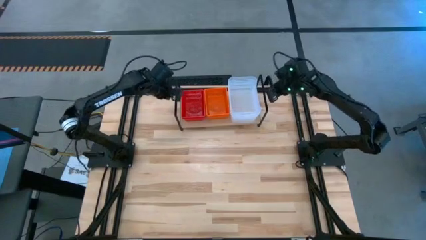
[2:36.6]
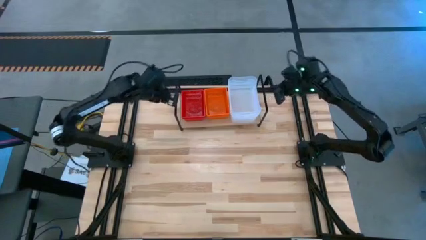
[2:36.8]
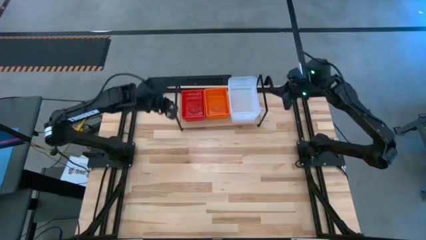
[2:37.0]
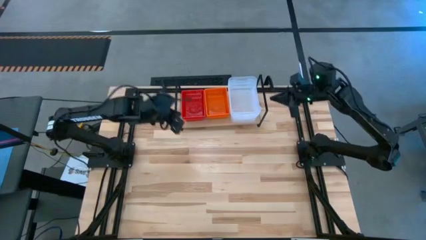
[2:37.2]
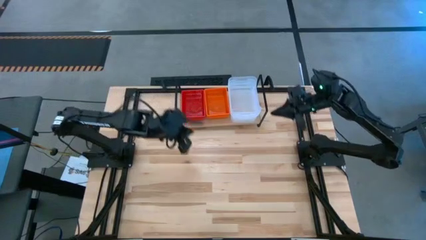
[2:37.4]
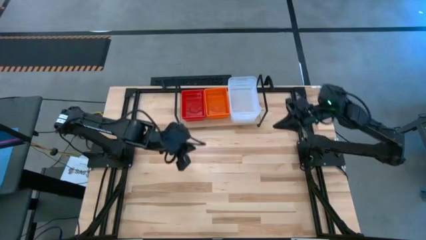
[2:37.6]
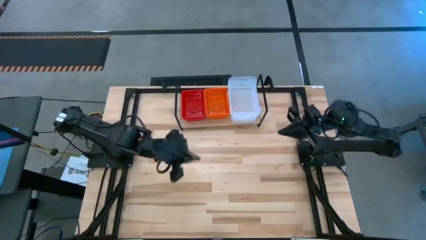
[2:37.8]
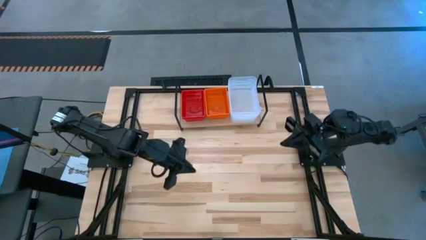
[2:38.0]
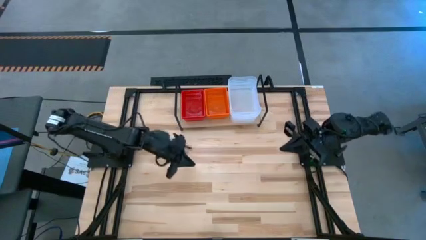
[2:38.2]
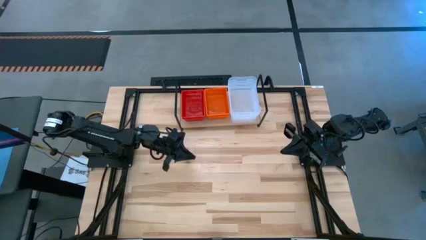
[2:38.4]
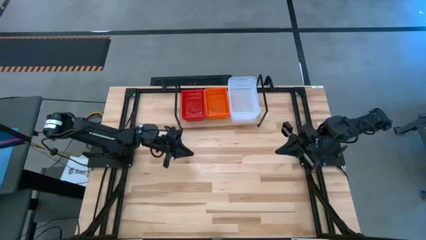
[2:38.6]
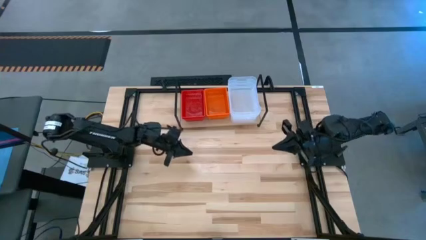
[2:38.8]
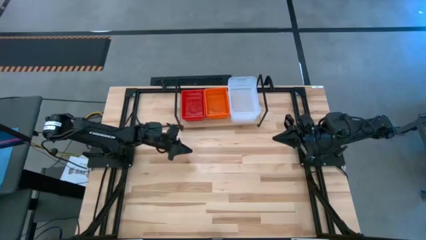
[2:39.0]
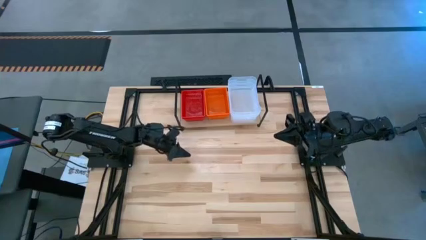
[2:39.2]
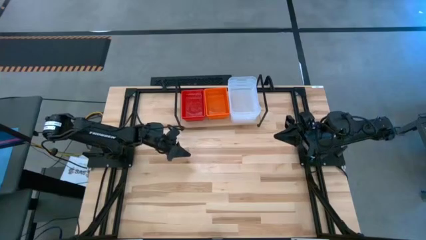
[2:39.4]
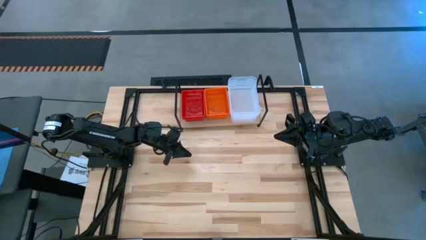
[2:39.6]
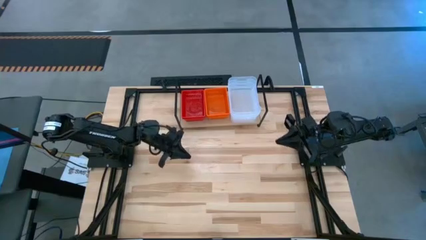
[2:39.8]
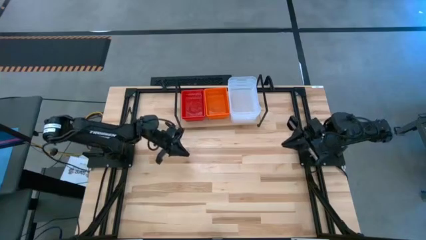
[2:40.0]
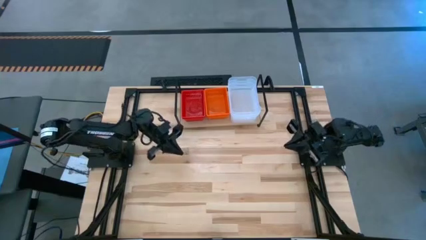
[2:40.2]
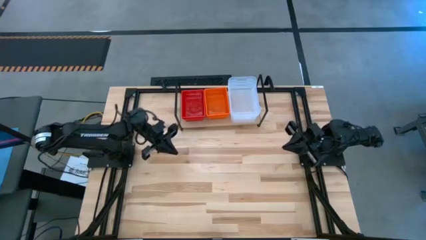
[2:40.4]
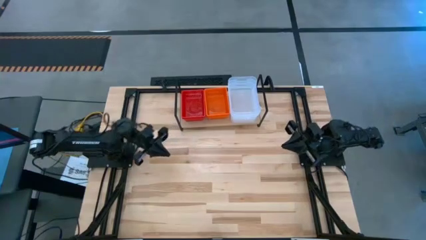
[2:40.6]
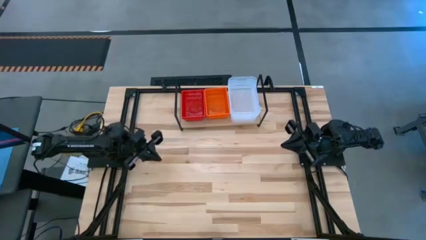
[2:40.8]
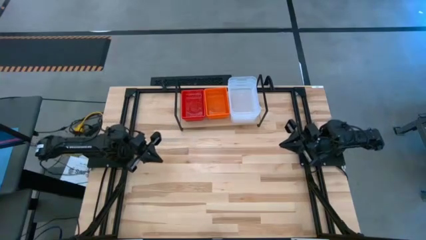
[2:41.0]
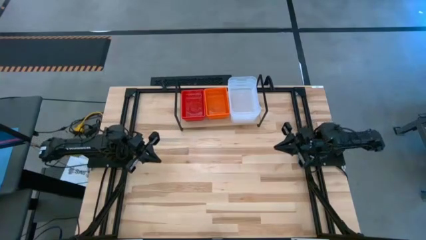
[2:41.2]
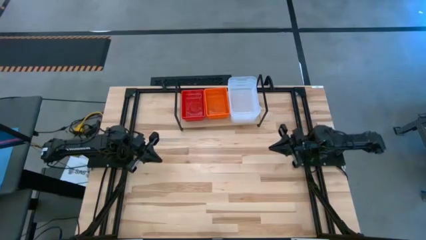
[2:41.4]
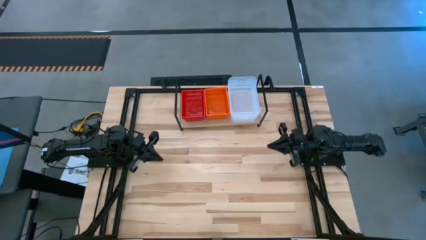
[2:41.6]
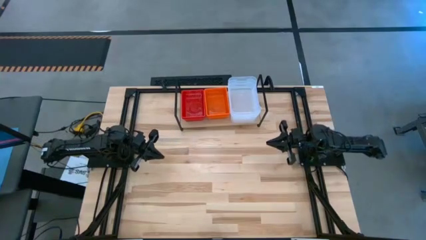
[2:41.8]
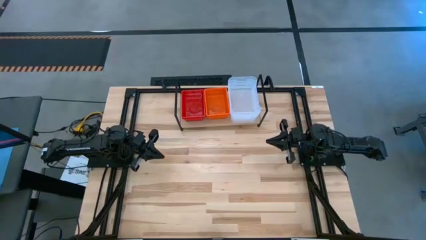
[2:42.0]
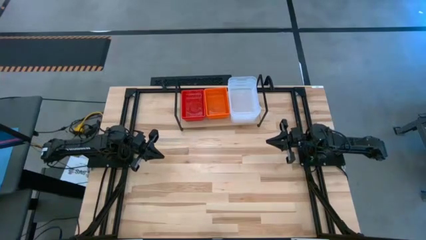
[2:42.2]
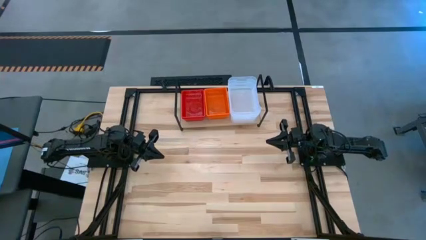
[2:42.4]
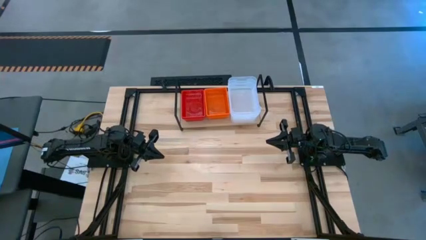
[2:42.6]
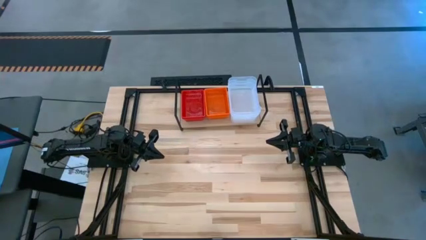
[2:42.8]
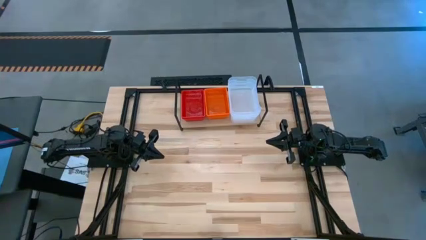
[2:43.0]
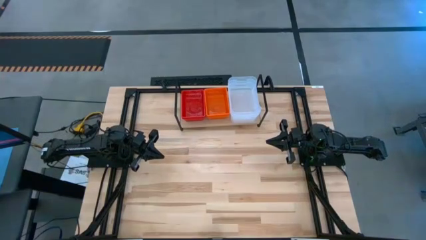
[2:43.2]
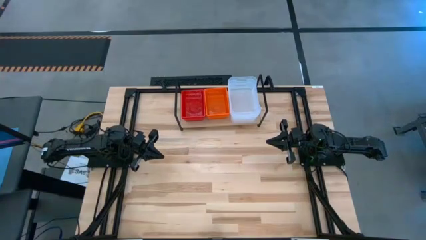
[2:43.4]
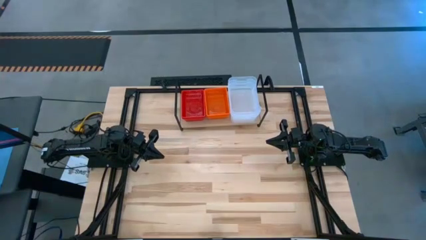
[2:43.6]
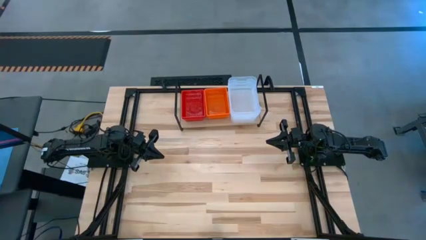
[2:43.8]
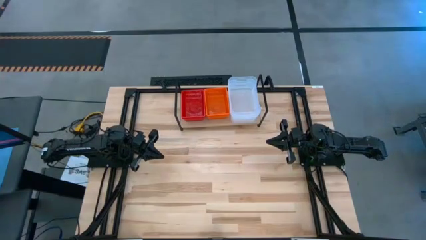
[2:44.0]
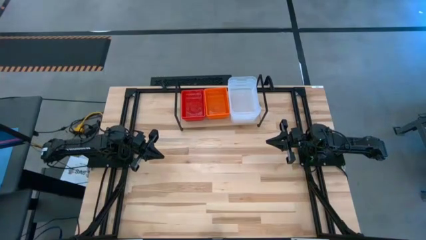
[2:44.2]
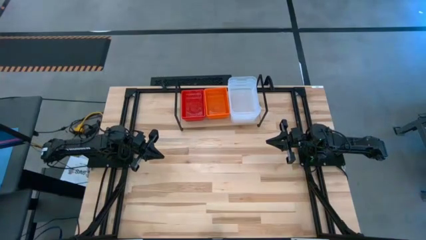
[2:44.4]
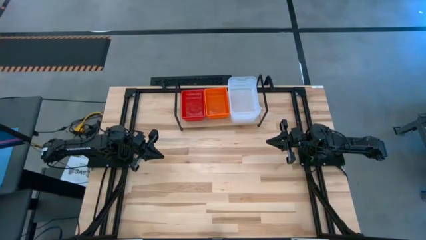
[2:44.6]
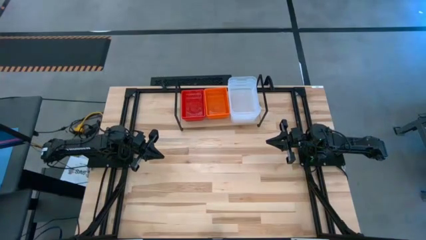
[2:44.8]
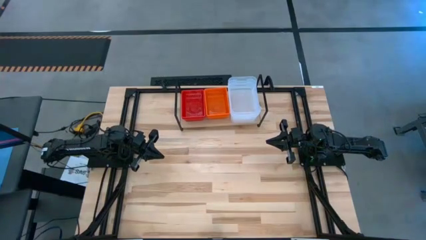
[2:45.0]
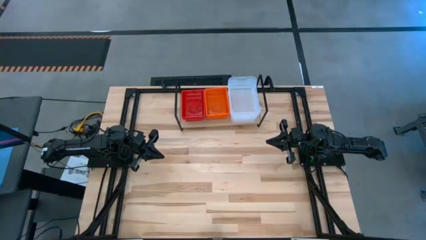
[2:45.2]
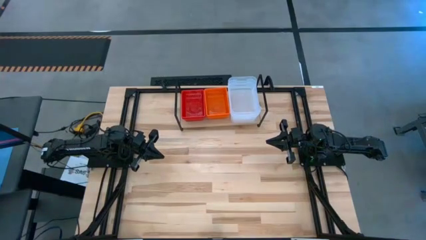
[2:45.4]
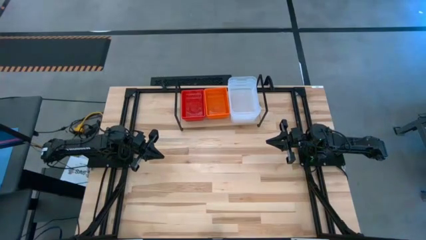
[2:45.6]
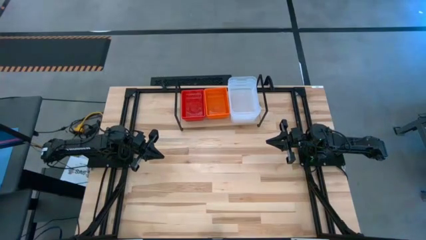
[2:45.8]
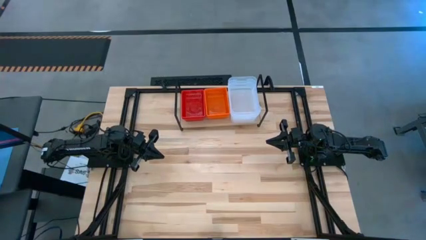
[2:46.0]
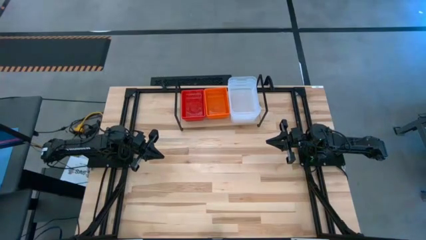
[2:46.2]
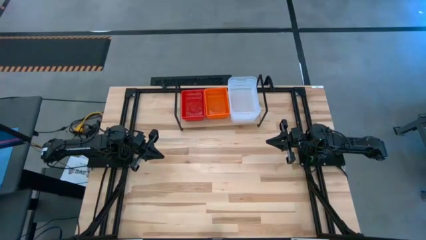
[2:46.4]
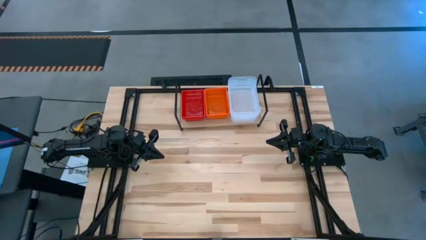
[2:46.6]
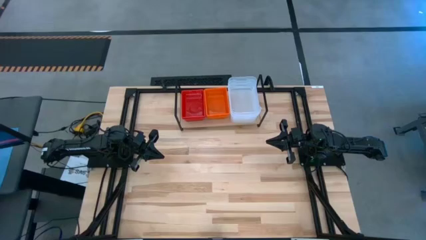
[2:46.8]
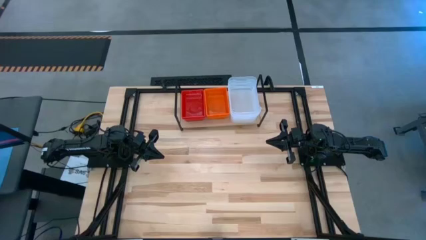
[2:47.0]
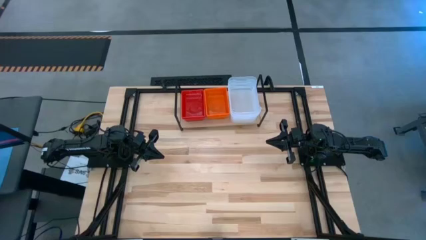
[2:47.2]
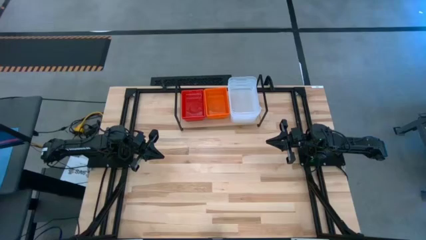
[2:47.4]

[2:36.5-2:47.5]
Task: Stack baskets on shelf by color
Return to Home Position

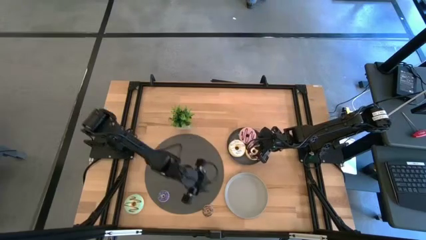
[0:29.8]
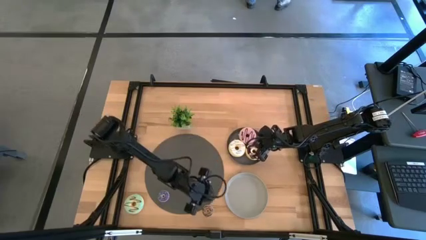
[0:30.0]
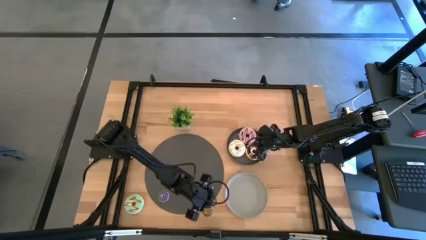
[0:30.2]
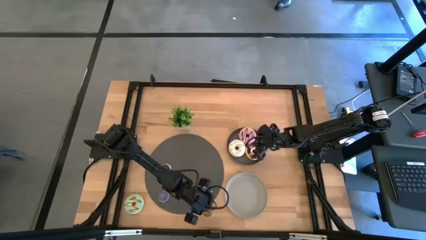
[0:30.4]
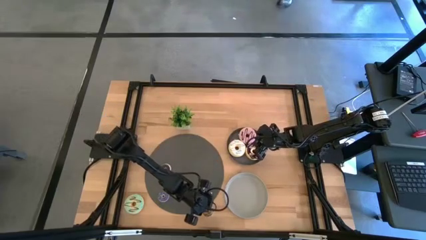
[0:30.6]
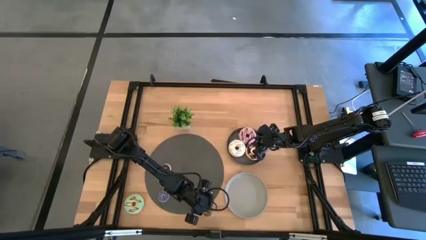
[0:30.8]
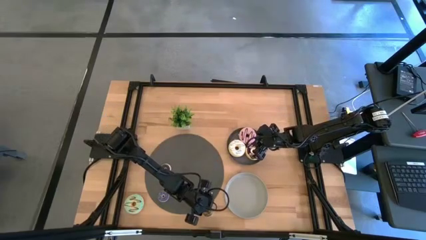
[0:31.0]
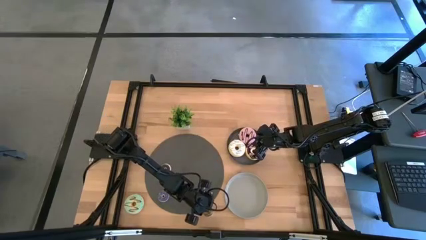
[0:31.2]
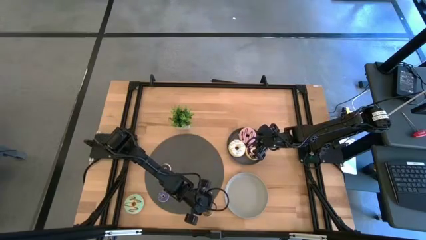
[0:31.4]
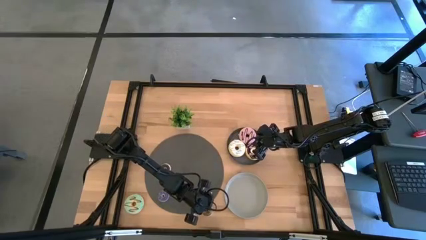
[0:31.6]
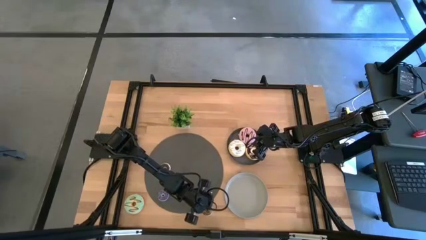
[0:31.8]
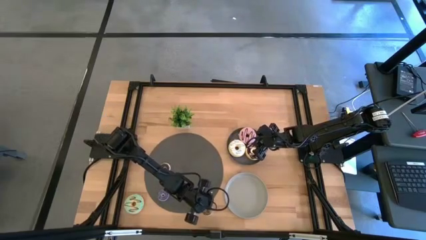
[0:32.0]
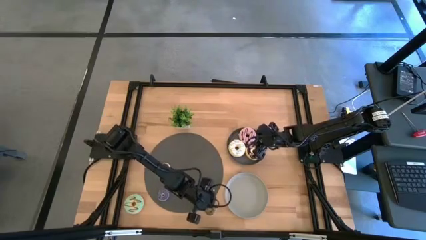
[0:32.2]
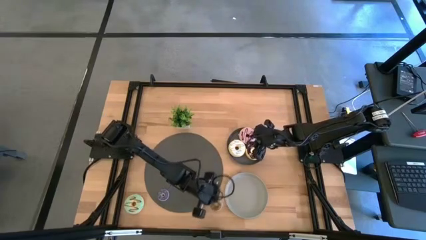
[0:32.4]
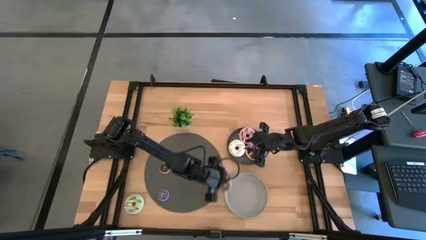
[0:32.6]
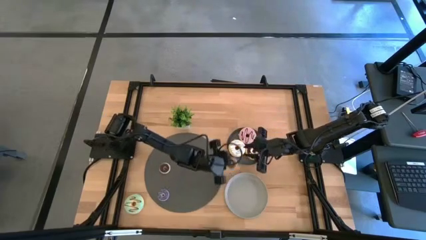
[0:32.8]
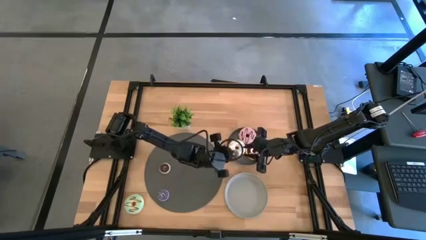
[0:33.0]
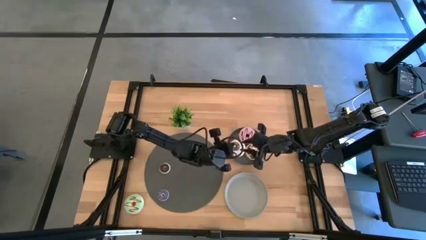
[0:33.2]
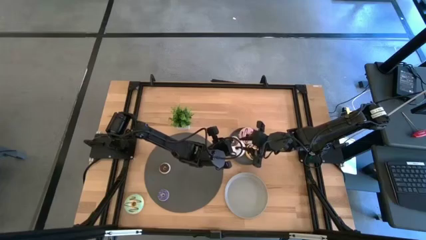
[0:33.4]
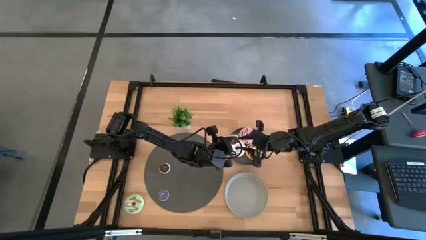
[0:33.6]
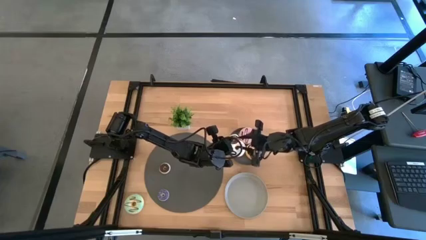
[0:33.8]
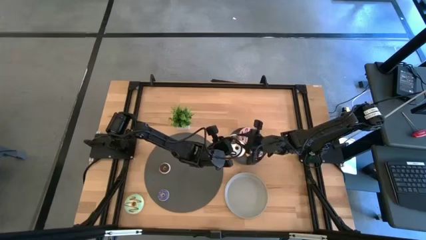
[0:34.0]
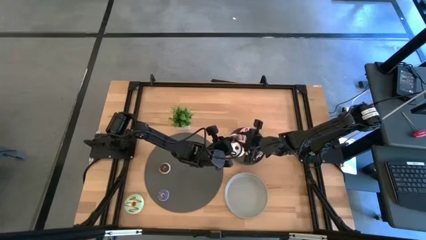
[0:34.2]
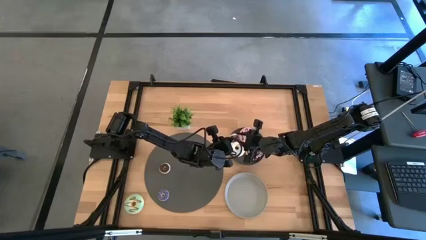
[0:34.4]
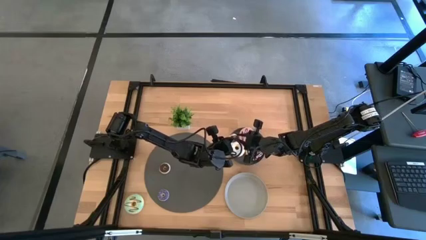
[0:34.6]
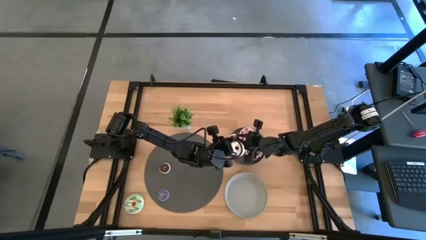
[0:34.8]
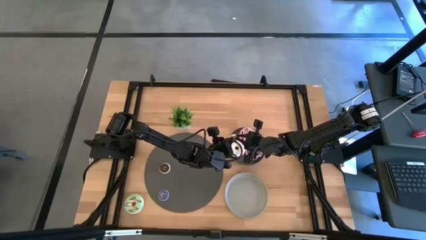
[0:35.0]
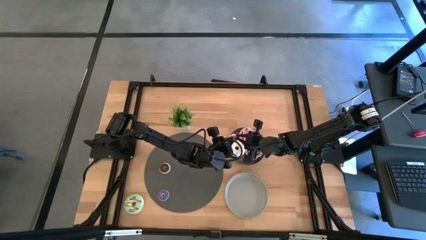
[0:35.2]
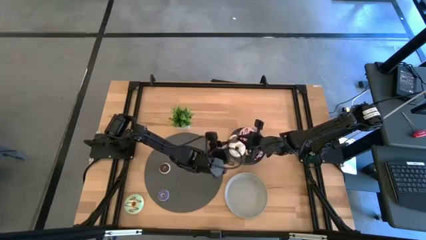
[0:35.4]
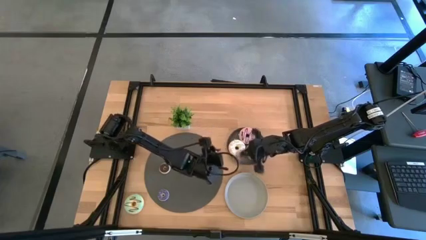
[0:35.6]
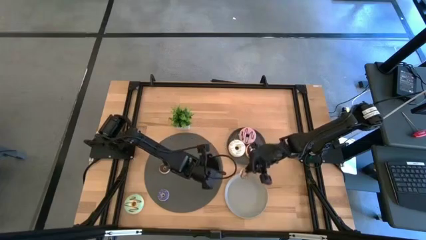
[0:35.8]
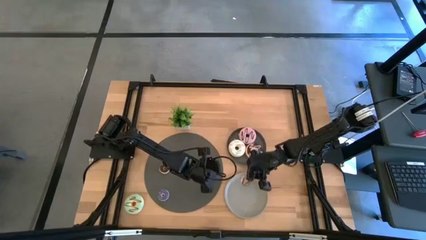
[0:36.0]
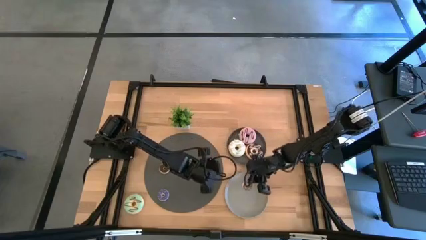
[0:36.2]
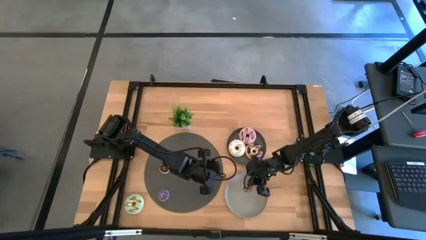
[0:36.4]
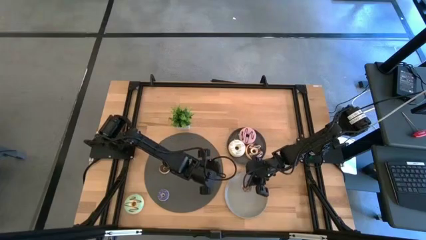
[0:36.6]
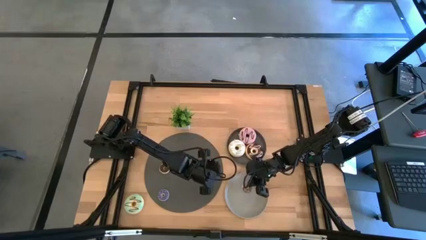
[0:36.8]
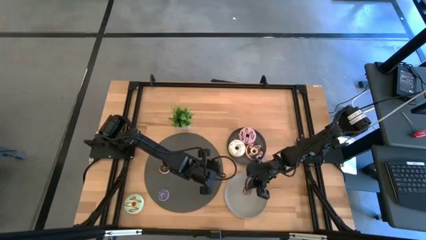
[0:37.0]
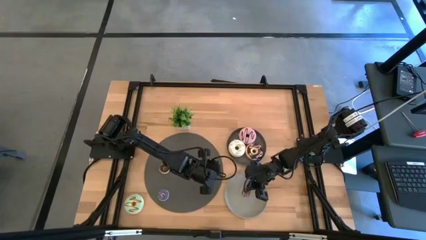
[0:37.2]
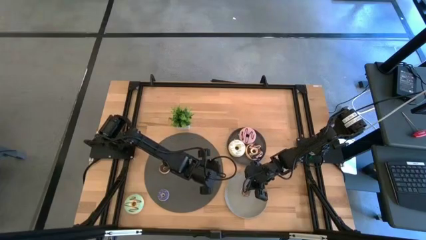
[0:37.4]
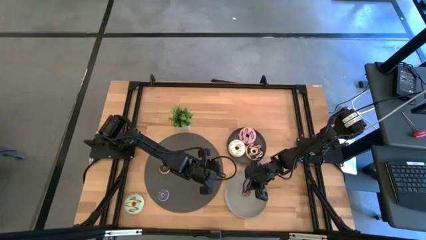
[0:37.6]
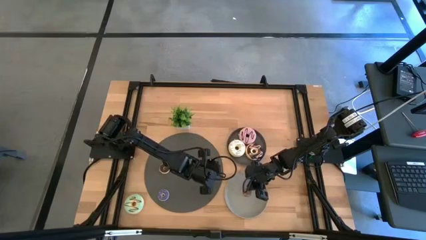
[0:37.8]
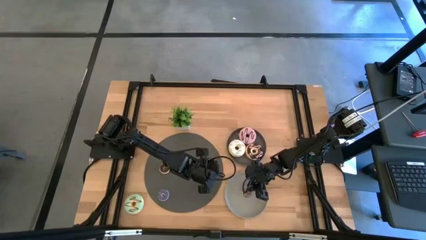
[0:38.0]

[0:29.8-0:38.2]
Task: Pick & Place donuts
Put the small brown donut on the gray plate
